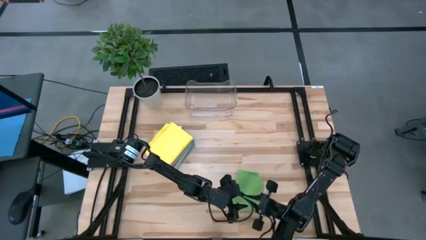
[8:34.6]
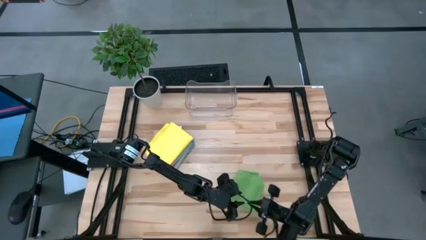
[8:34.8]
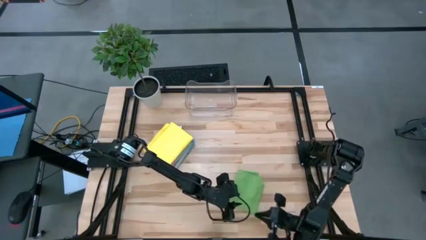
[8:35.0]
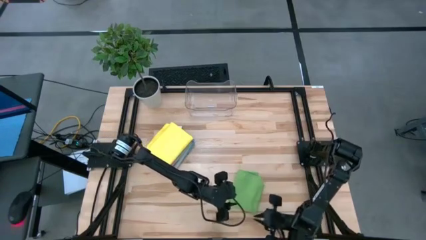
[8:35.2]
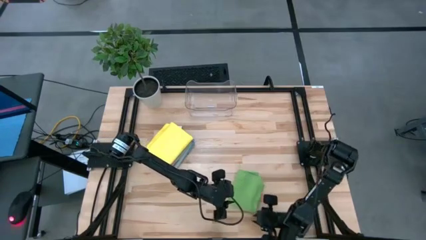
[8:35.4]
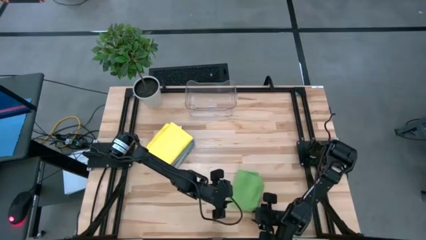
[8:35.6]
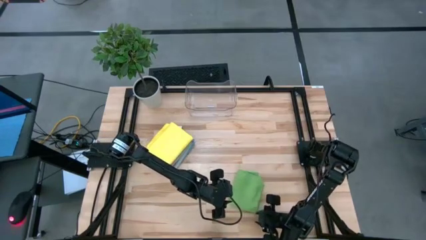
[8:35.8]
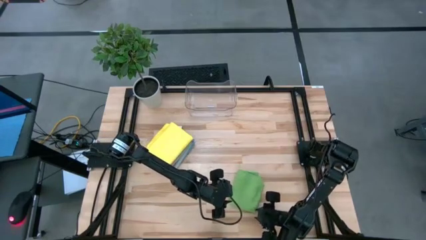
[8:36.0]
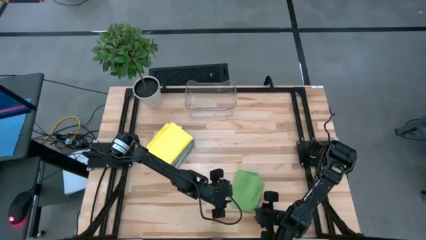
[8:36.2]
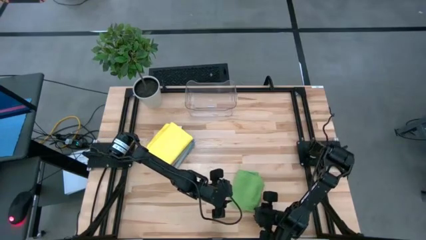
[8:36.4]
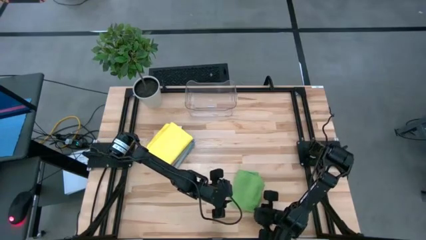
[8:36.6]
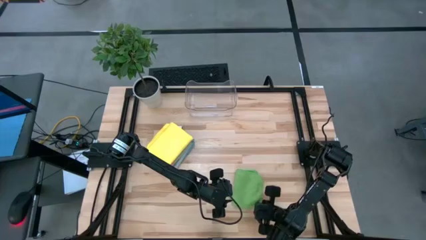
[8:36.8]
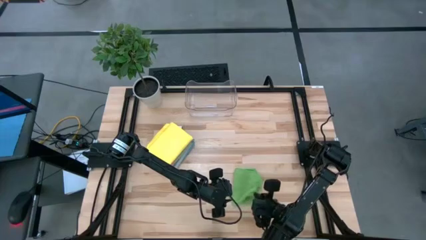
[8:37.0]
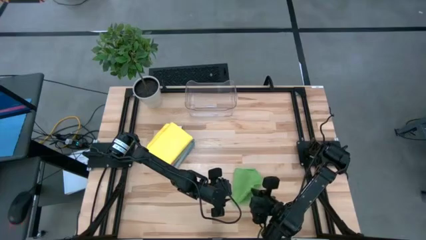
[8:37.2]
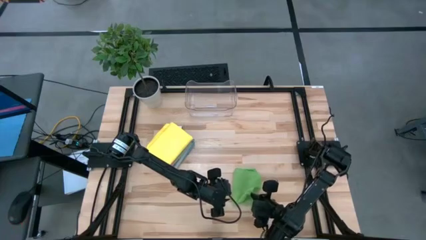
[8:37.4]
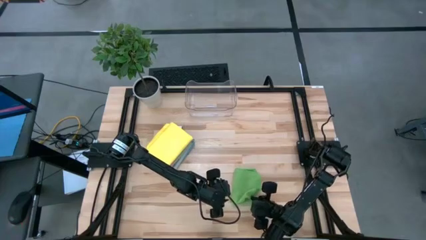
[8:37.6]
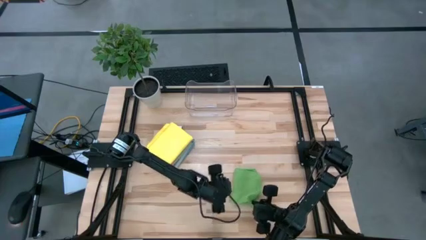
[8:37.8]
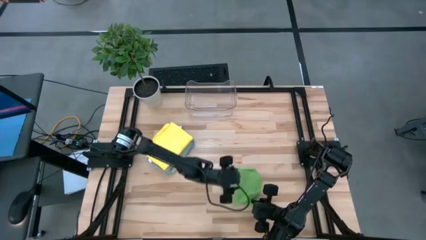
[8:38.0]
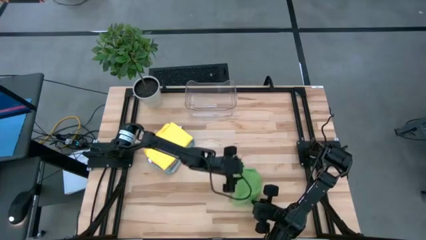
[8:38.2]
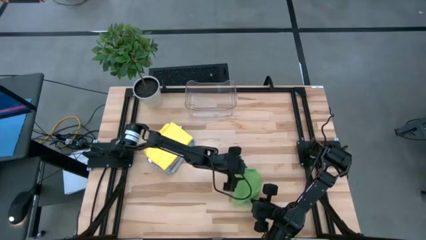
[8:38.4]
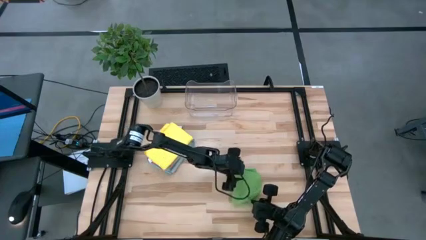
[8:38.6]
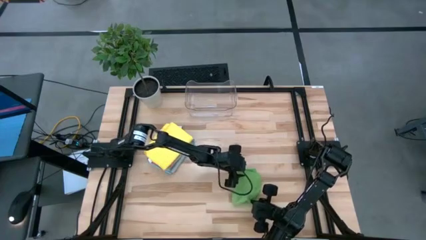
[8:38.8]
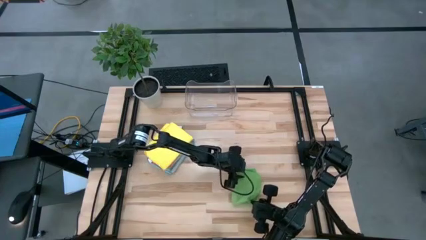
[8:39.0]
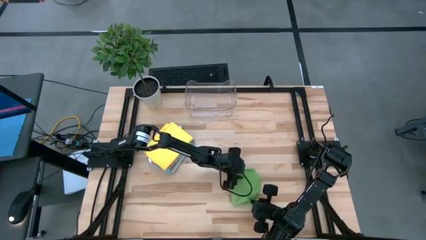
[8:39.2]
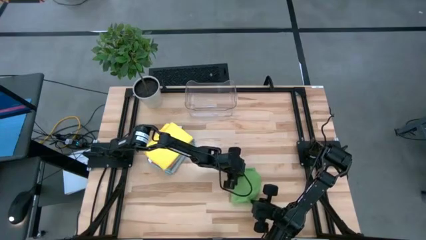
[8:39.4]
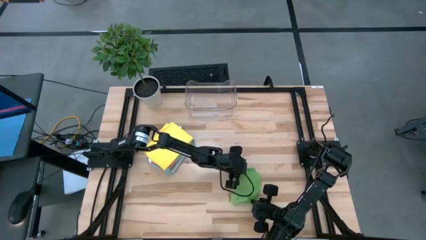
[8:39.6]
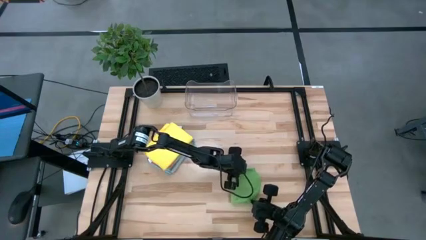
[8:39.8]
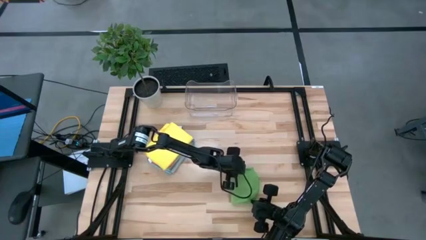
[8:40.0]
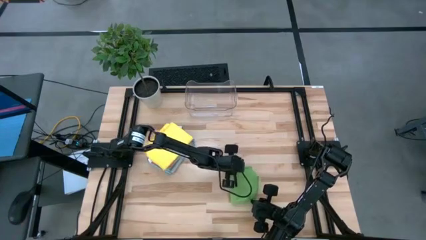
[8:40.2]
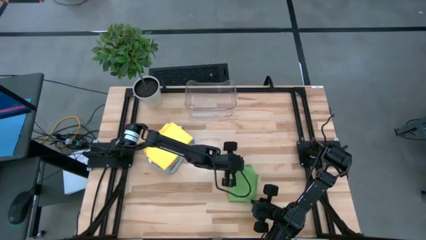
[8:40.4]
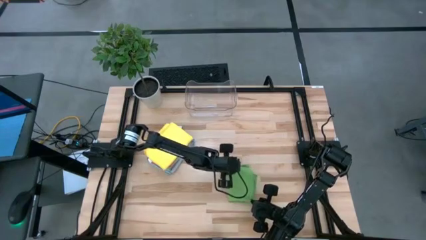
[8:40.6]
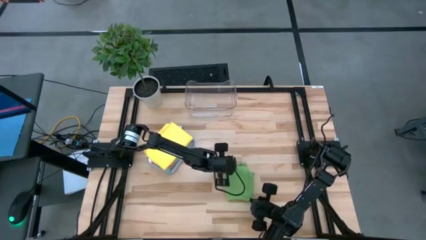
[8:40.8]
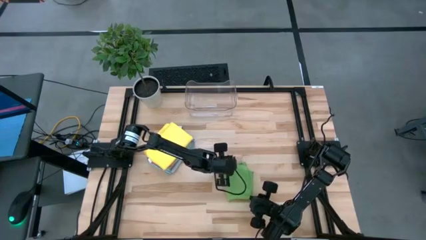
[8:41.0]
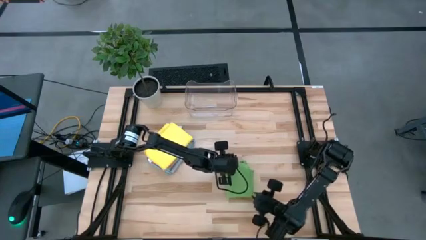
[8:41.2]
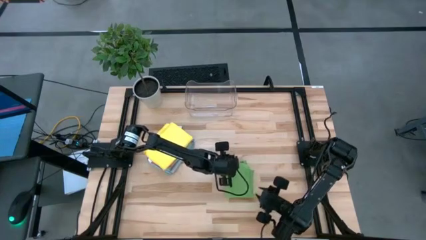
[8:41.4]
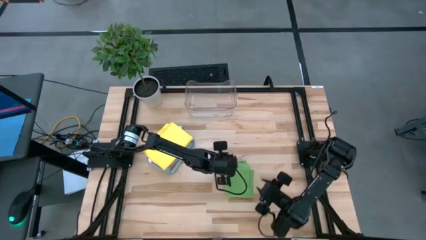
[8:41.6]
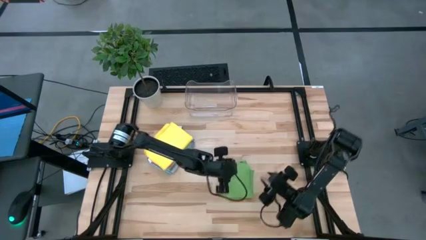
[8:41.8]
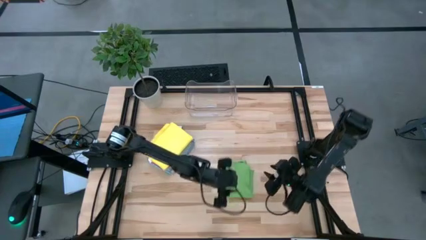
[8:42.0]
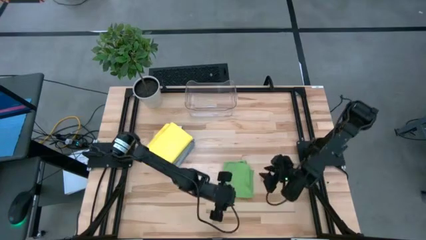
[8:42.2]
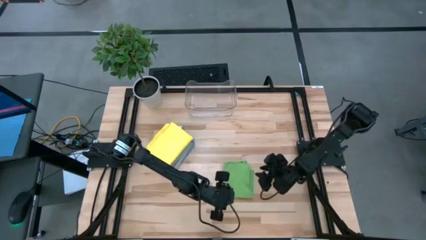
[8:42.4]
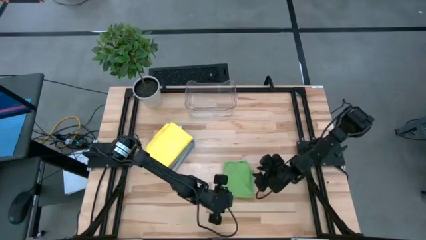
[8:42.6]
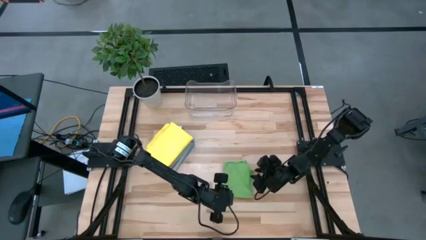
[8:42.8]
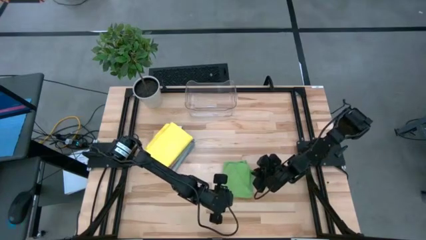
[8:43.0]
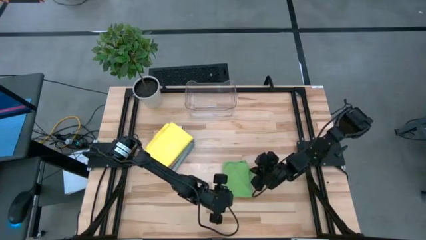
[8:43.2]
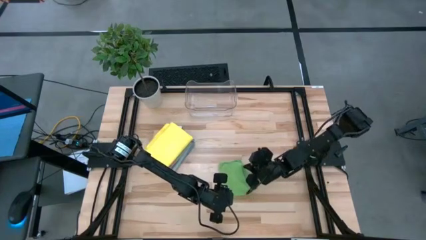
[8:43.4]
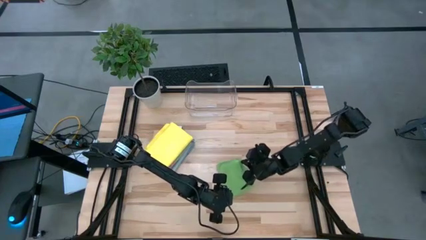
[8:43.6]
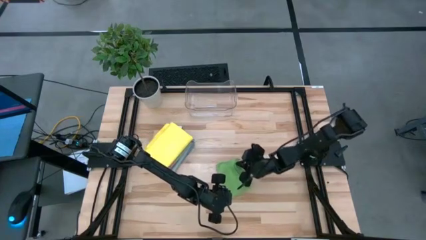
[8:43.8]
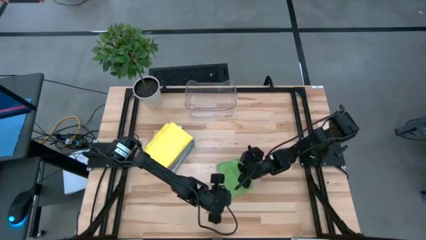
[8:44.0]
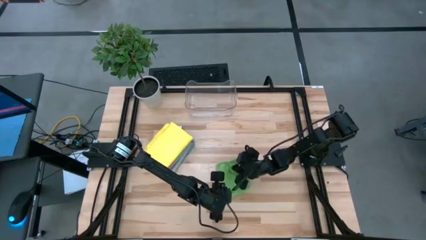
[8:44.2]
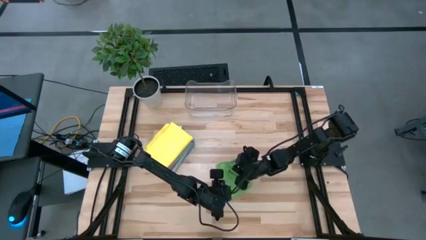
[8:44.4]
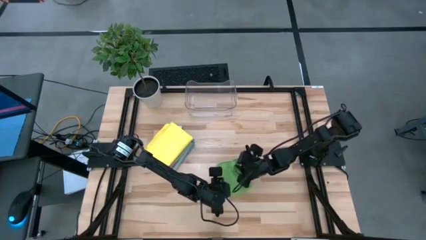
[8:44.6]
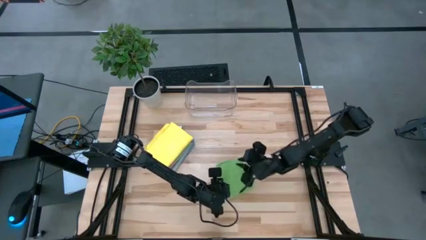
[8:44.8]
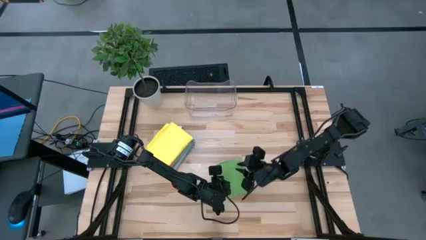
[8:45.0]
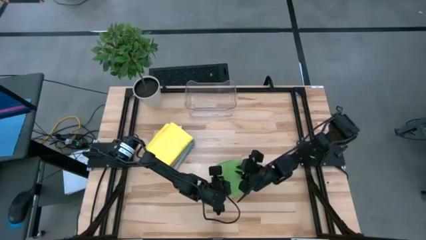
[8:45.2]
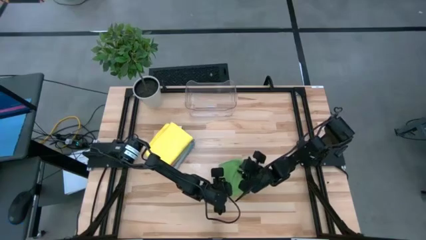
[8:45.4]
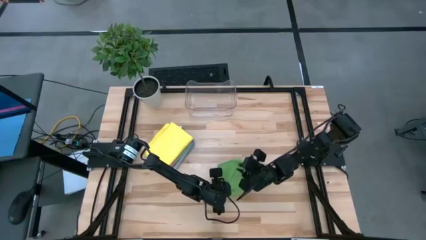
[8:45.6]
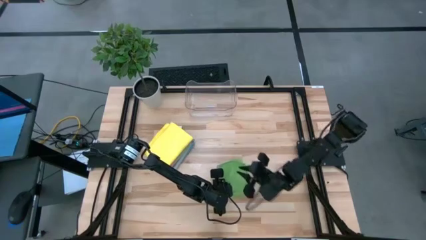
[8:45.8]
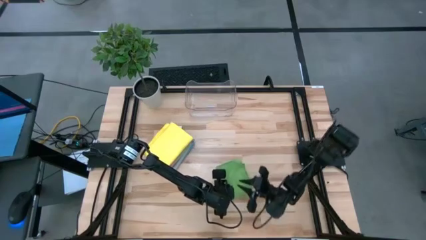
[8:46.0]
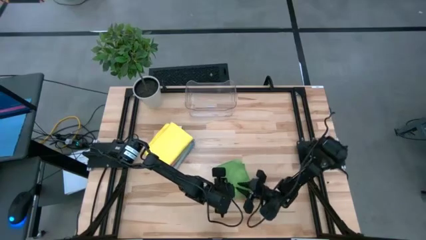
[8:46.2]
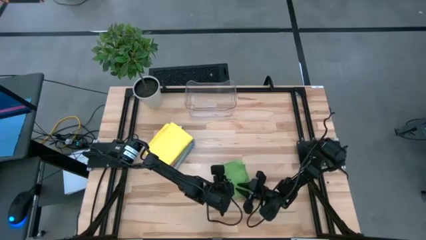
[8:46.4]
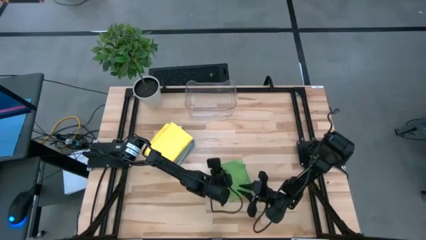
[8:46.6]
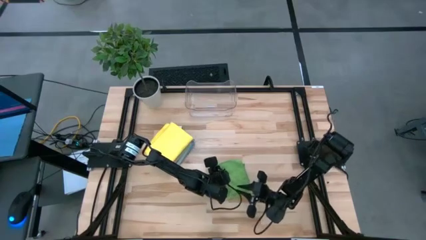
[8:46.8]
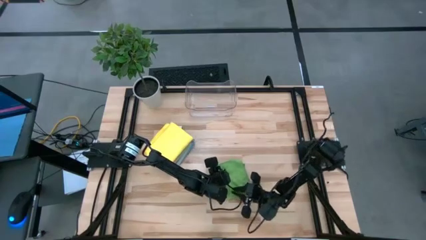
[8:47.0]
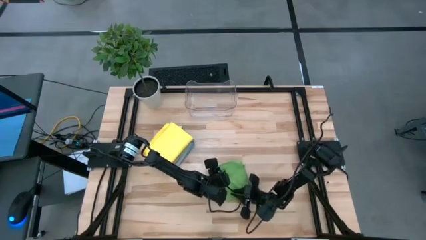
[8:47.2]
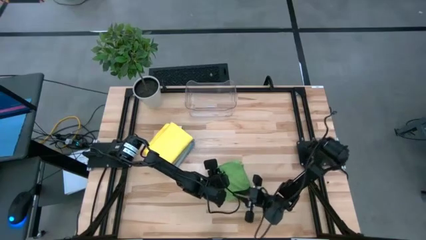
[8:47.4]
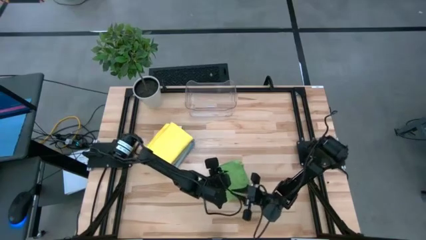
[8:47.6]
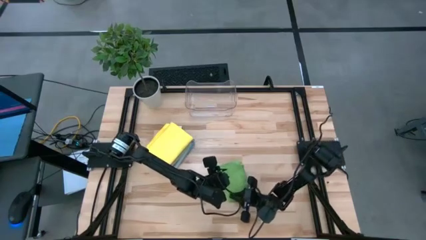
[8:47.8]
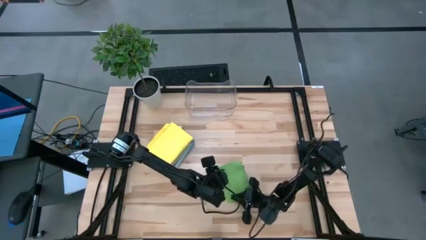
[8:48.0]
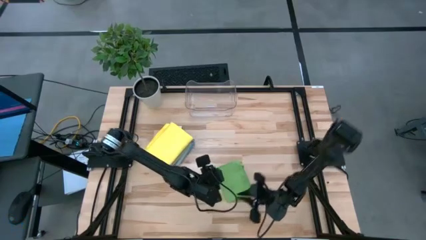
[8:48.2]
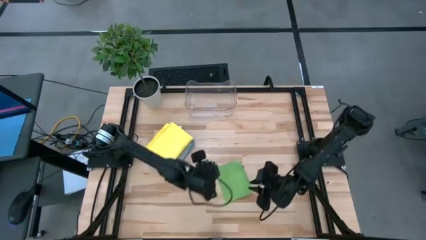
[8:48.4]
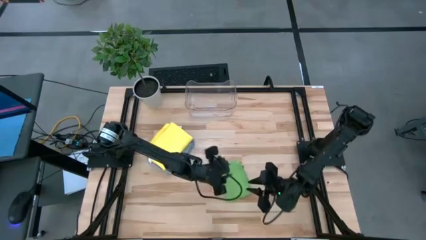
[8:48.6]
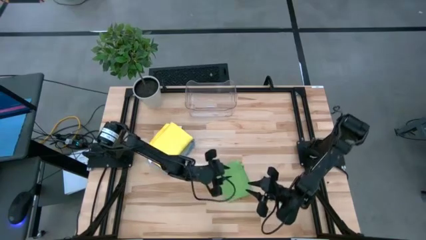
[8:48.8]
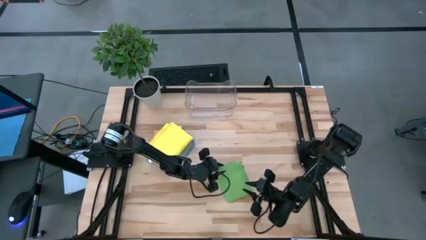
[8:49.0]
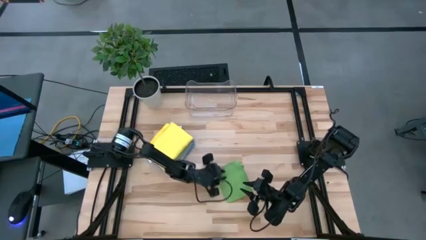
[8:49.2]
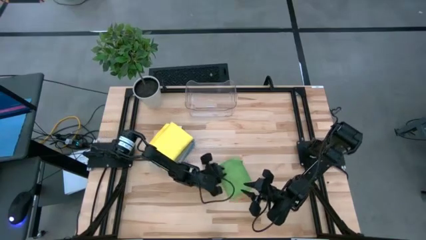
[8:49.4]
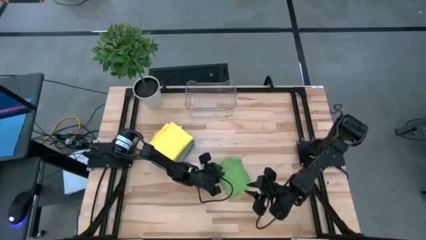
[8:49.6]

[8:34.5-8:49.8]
Task: Fold microfiber towels
Fold the green microfiber cloth
